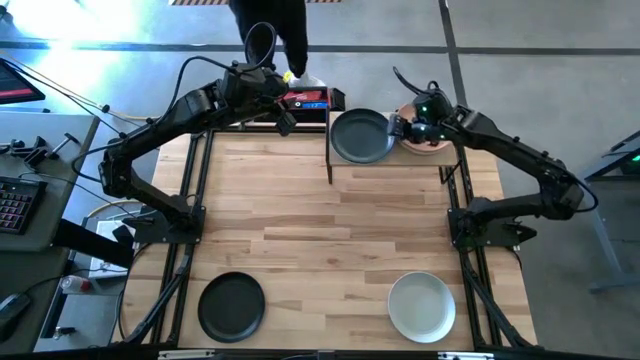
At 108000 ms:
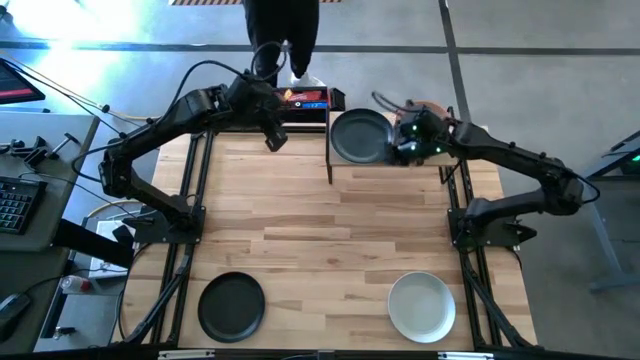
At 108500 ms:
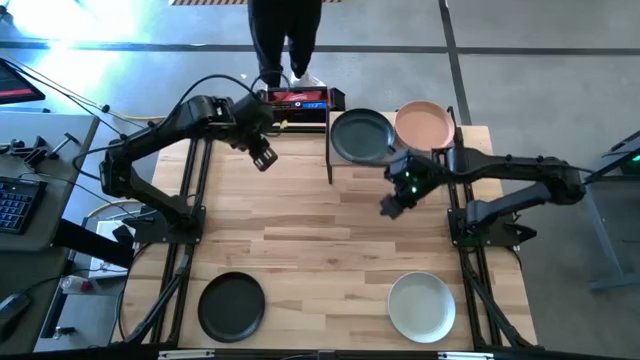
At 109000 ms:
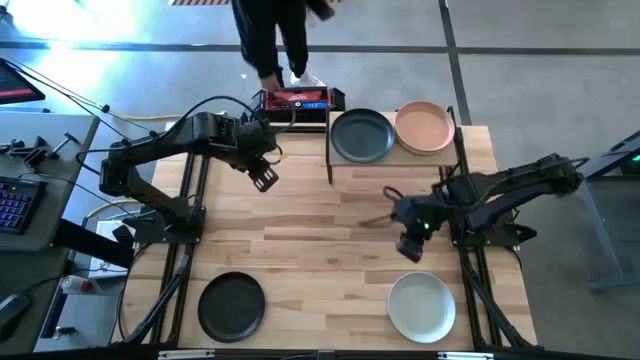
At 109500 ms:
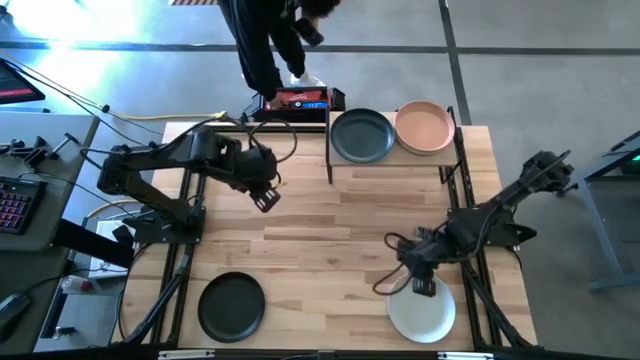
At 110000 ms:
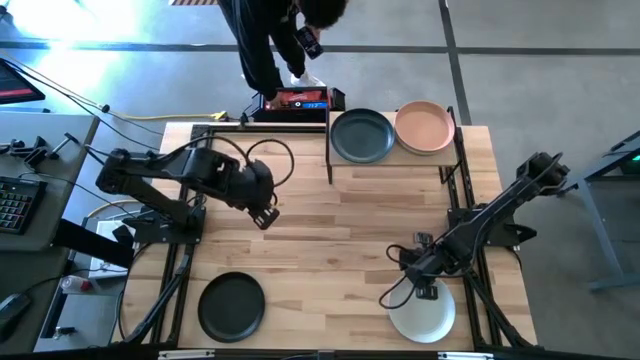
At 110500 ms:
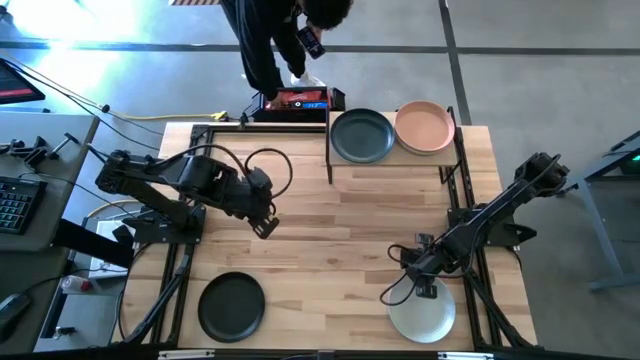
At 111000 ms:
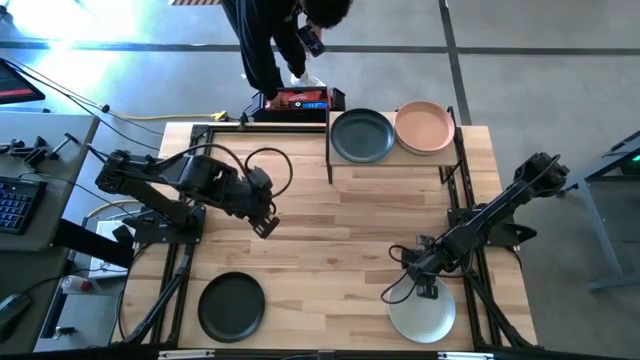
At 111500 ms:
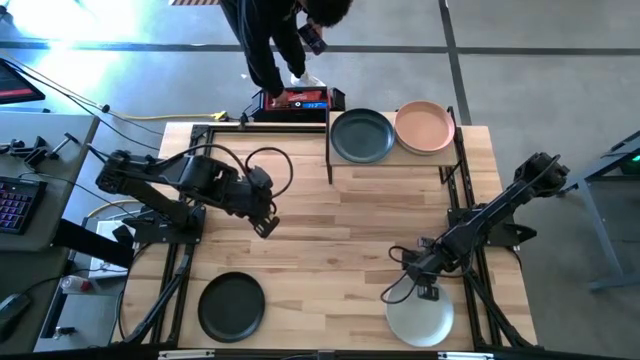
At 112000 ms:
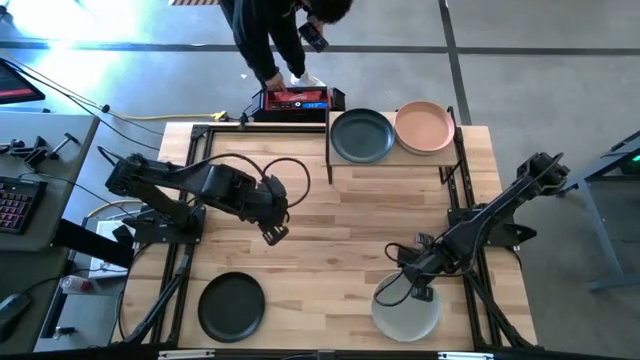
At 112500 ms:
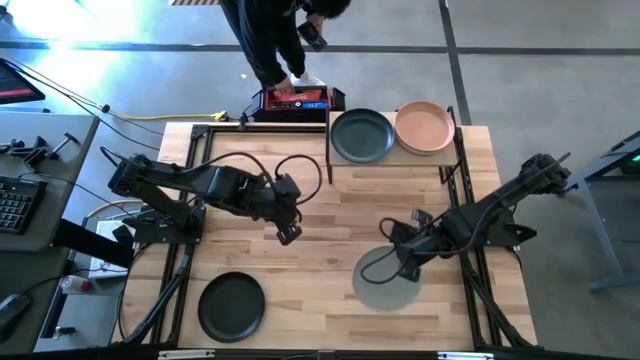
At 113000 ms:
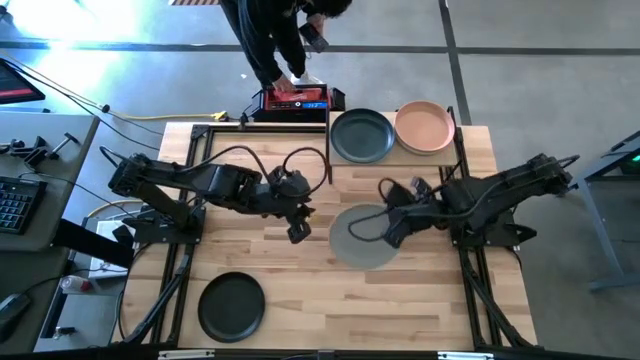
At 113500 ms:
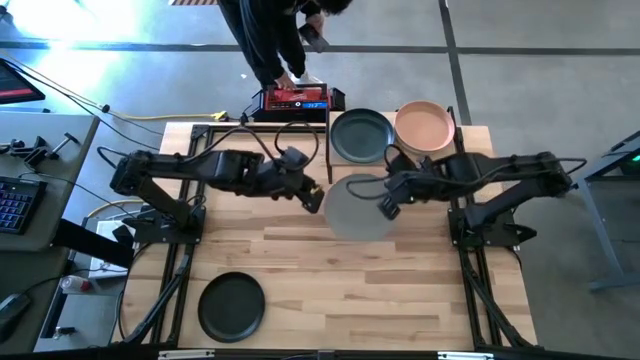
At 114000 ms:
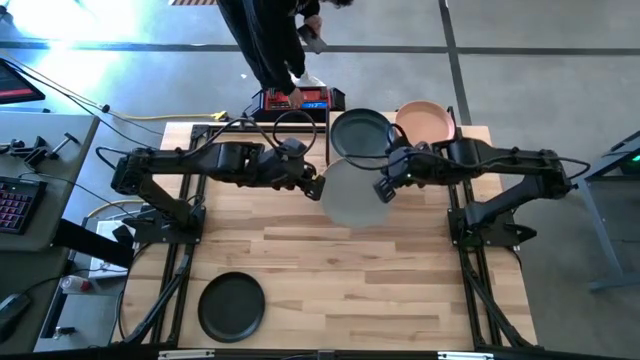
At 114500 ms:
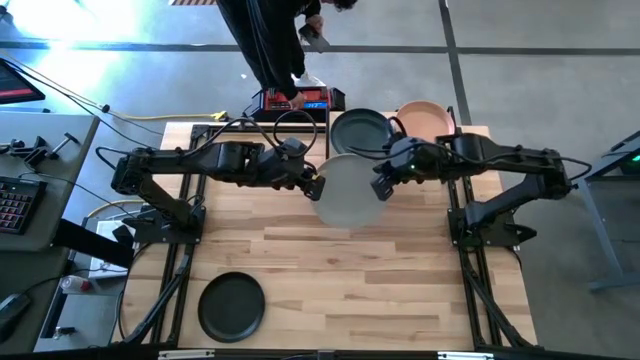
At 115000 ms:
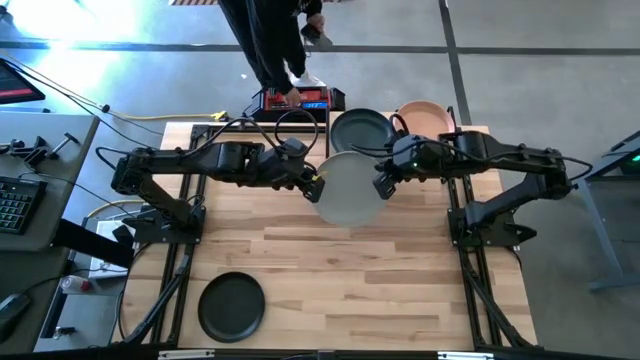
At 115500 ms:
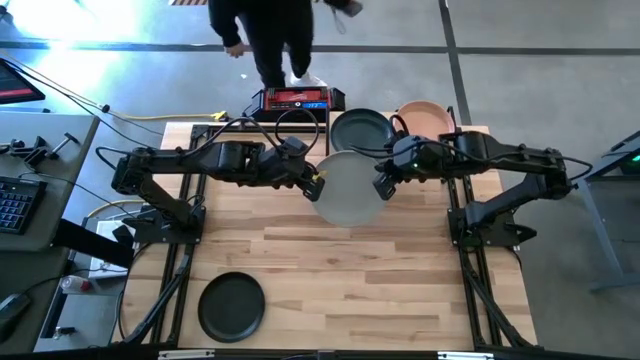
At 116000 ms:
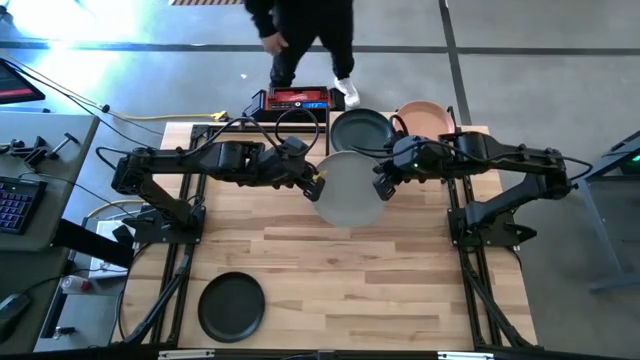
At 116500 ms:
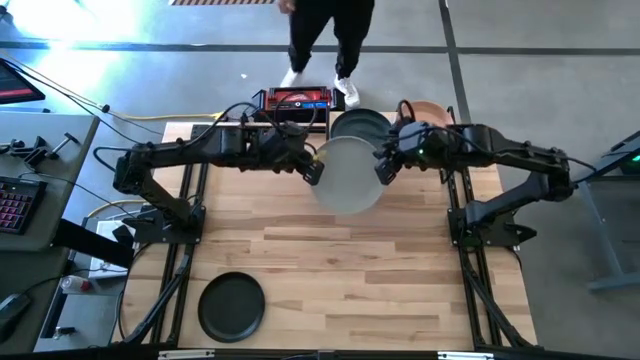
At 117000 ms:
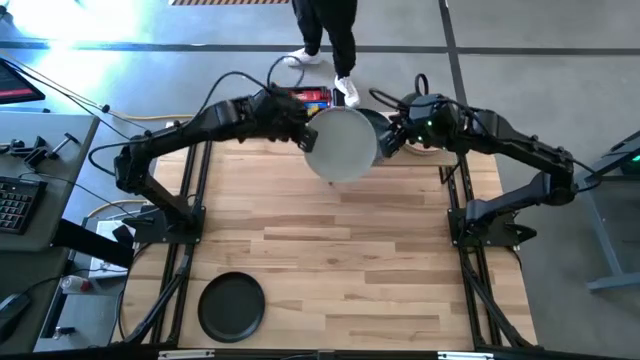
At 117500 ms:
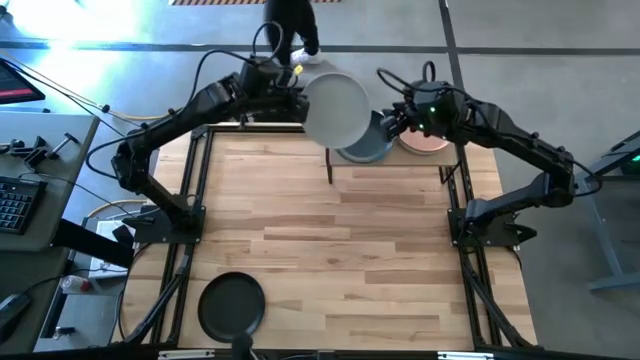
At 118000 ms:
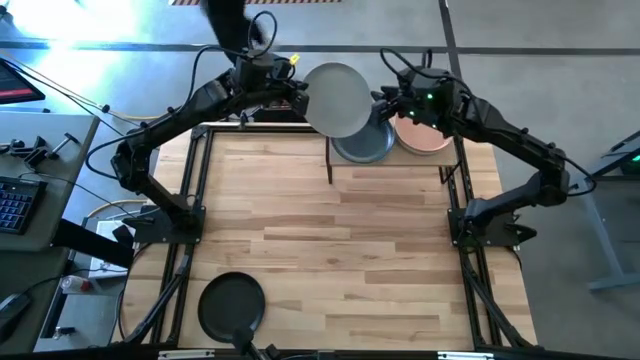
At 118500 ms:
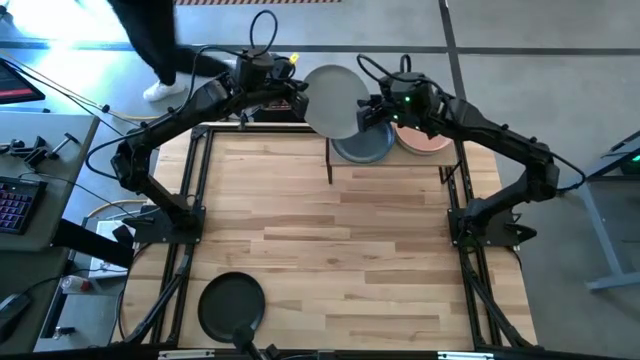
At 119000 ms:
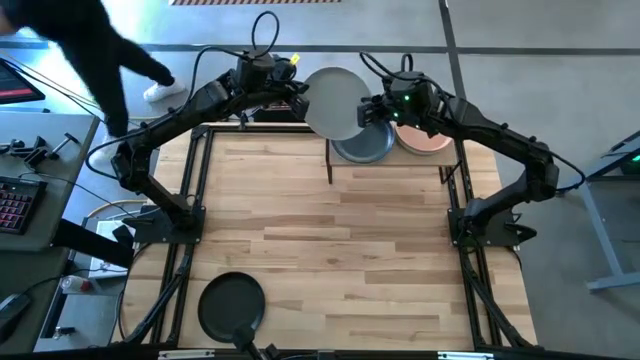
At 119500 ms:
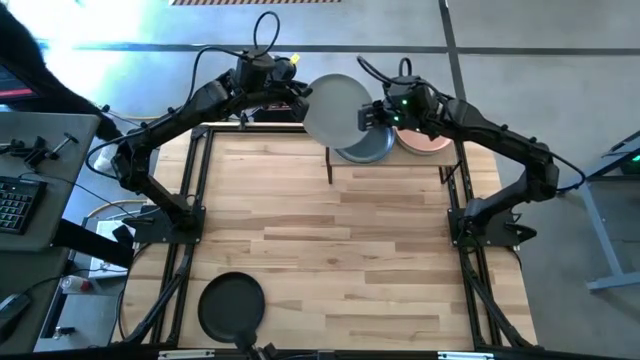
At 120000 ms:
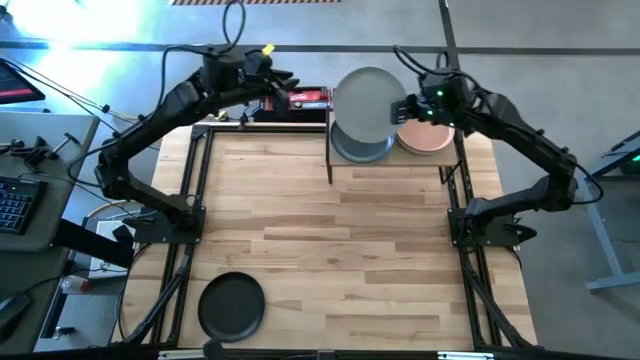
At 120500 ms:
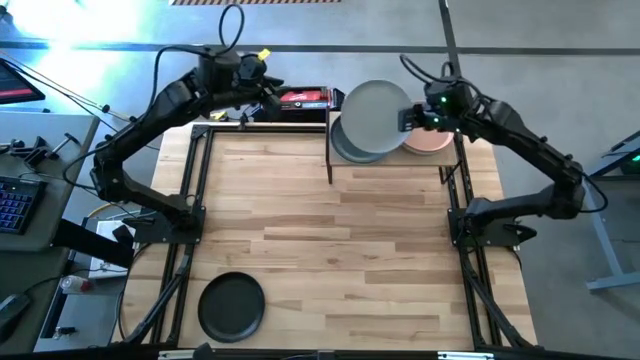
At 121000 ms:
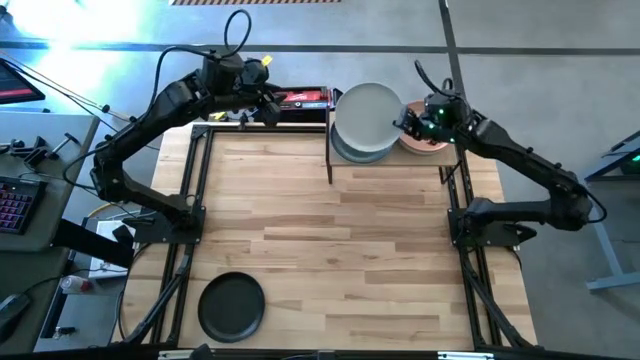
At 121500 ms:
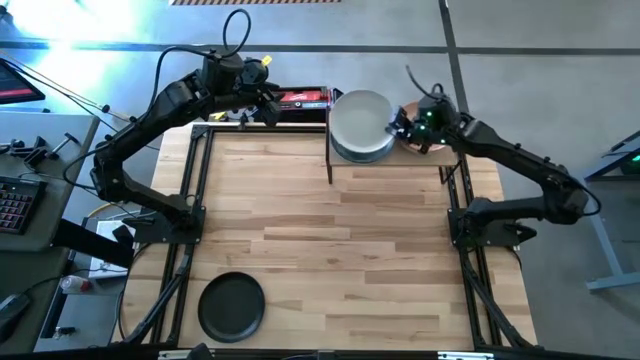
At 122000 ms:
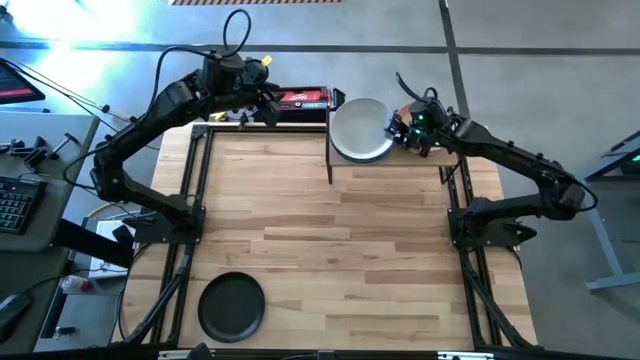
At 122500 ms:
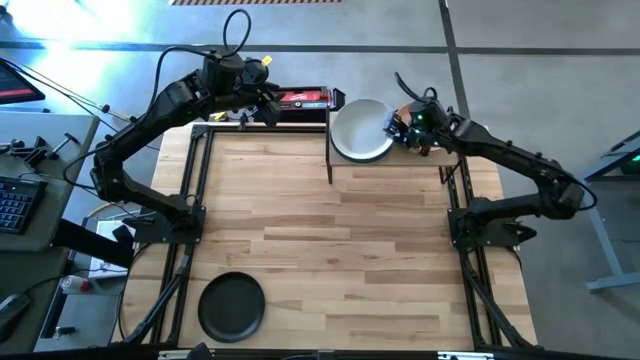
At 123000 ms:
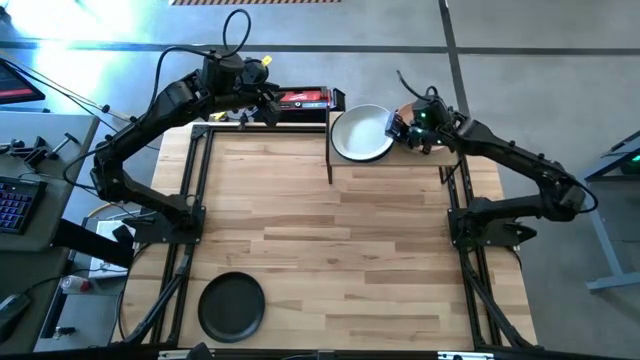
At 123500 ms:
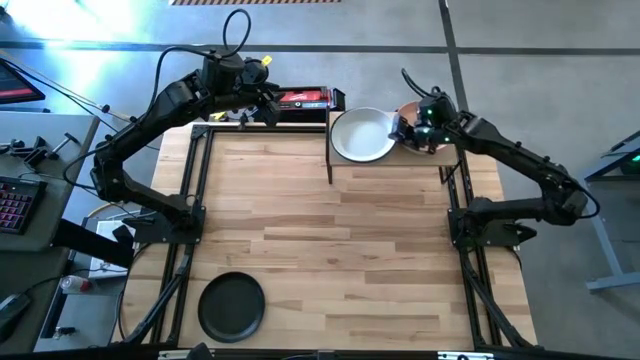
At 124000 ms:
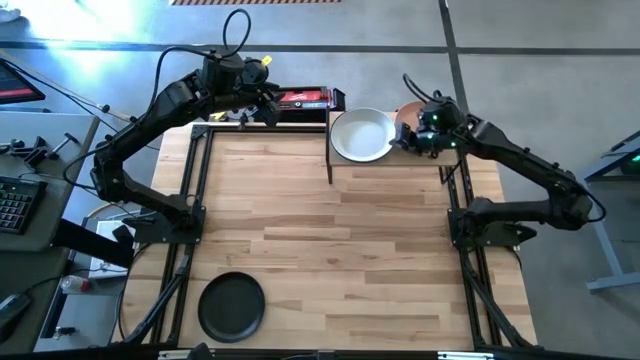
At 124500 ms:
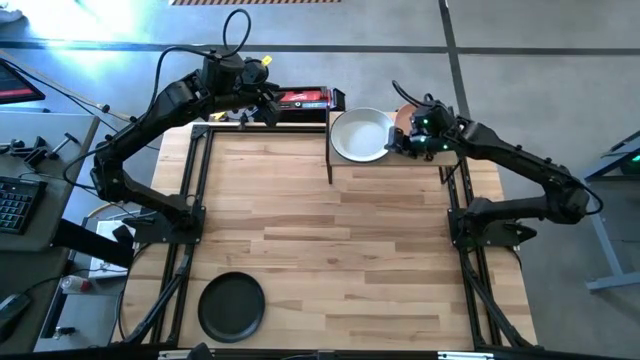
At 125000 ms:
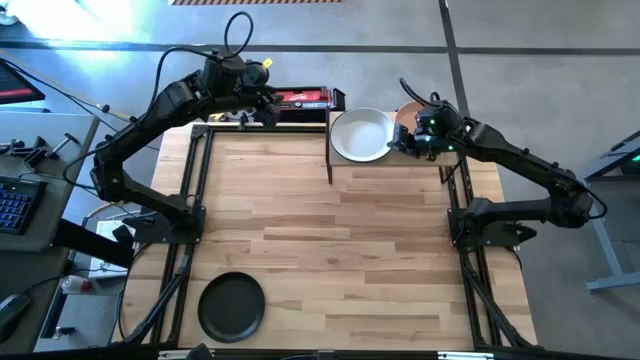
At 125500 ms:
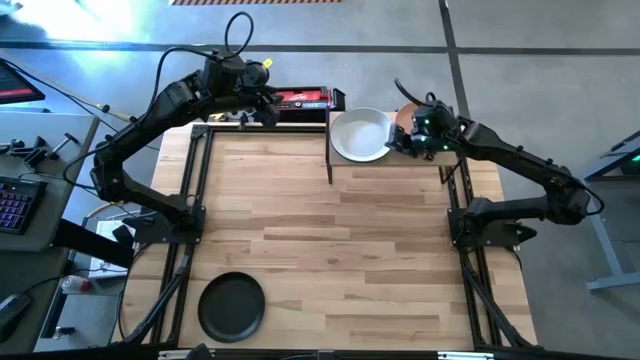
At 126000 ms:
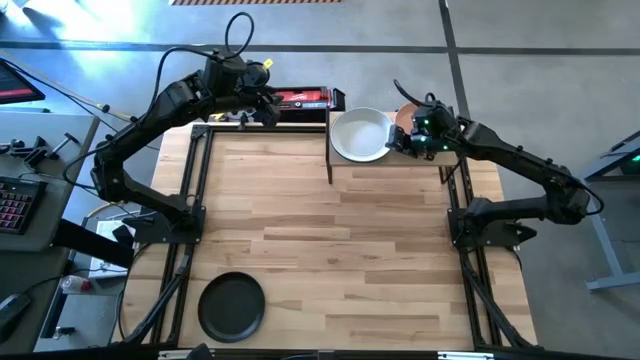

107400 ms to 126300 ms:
Task: Place and stack plates onto a shelf
Stack the white plate on the black plate on the shelf

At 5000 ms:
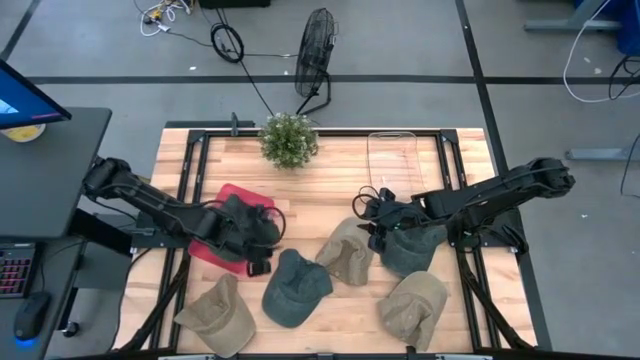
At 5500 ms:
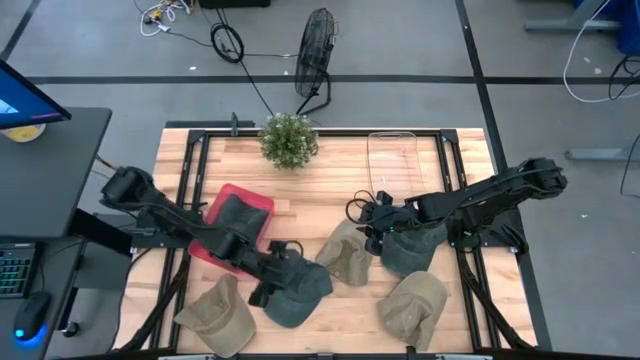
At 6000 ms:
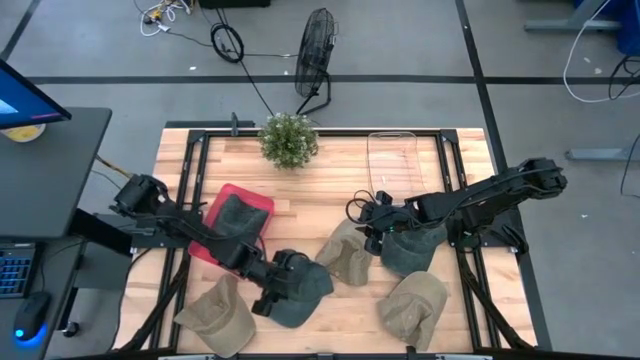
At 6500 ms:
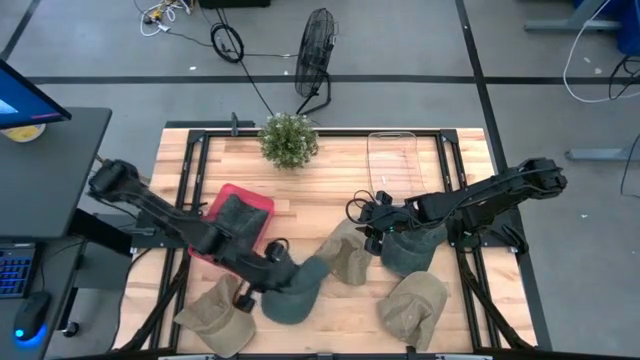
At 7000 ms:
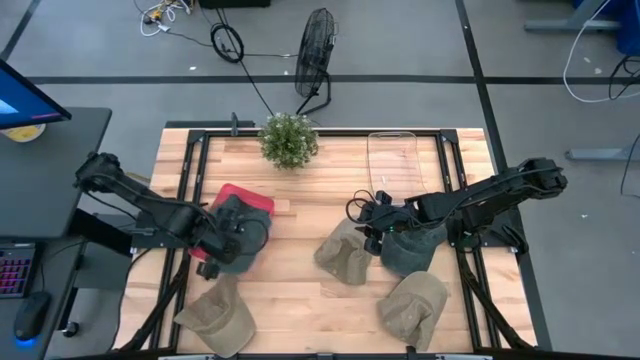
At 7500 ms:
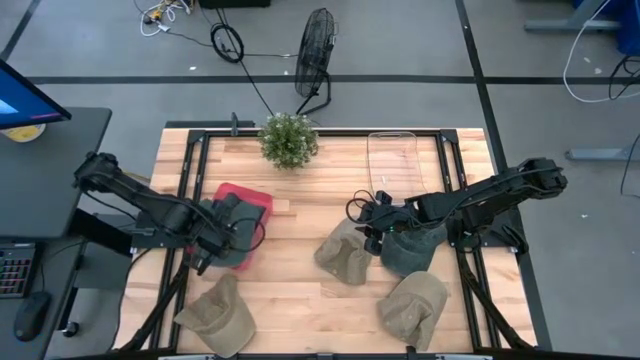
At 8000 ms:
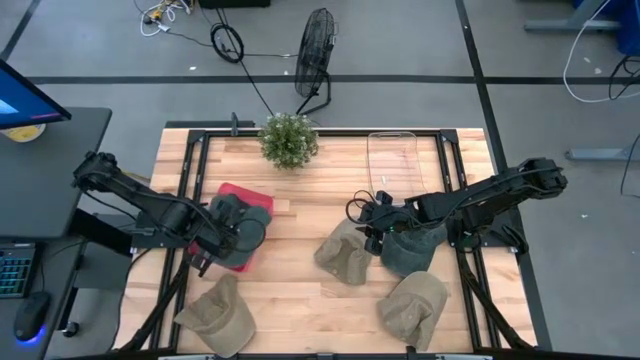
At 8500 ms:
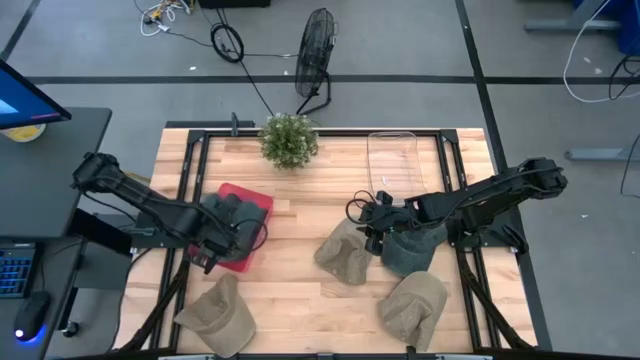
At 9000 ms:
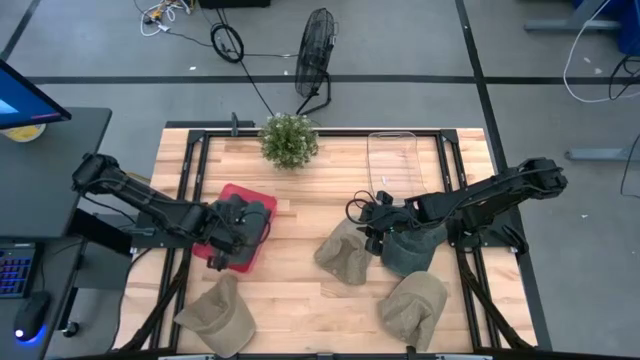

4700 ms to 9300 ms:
Task: Pick & Place hat
Put the left black cap into the red bin
